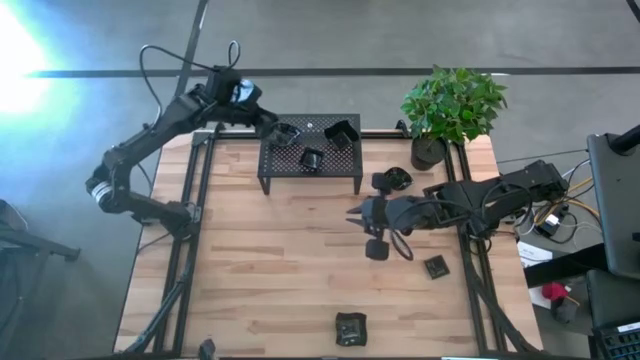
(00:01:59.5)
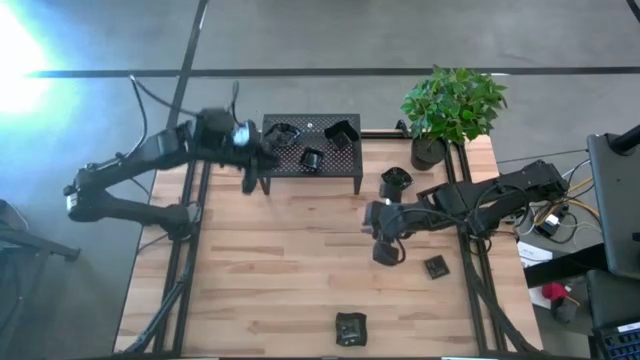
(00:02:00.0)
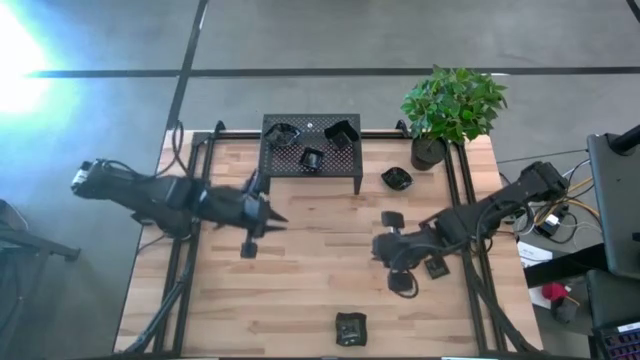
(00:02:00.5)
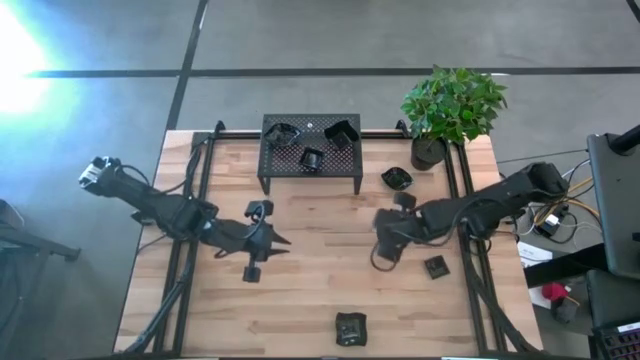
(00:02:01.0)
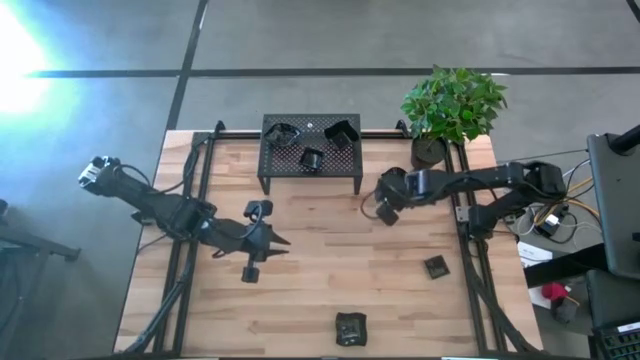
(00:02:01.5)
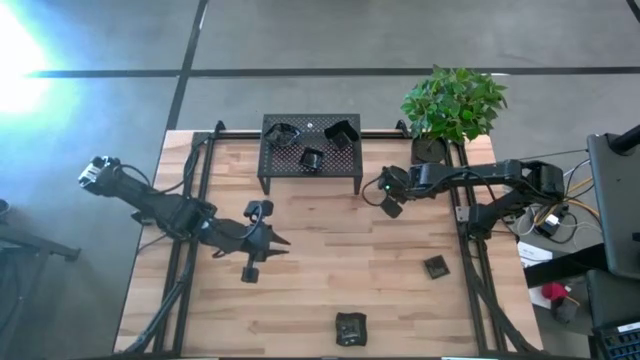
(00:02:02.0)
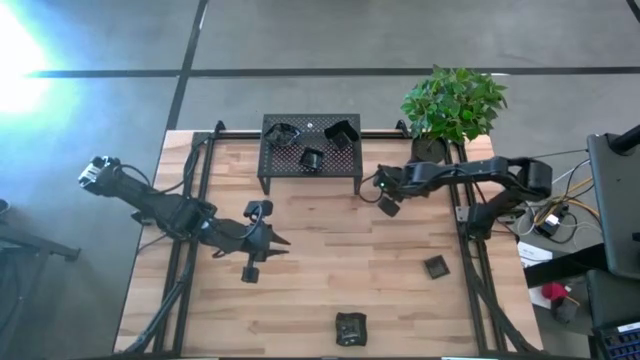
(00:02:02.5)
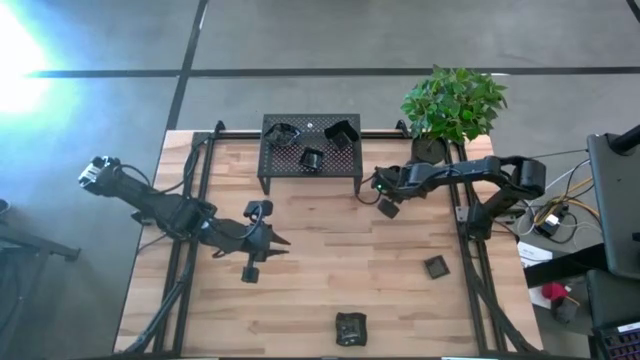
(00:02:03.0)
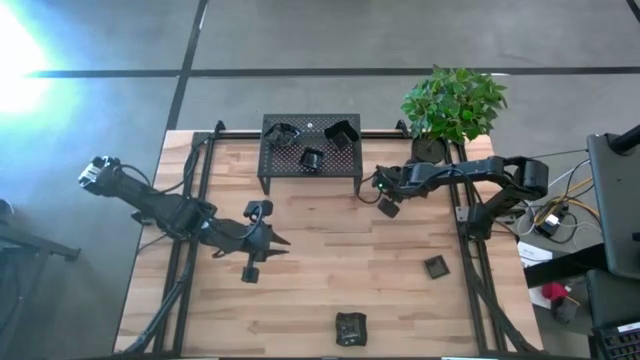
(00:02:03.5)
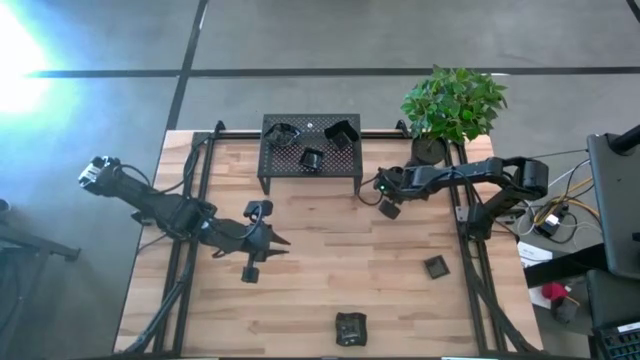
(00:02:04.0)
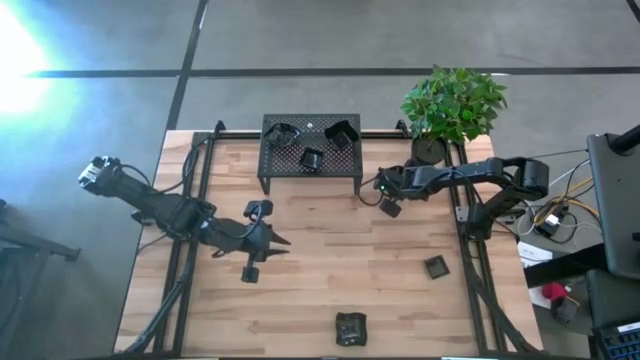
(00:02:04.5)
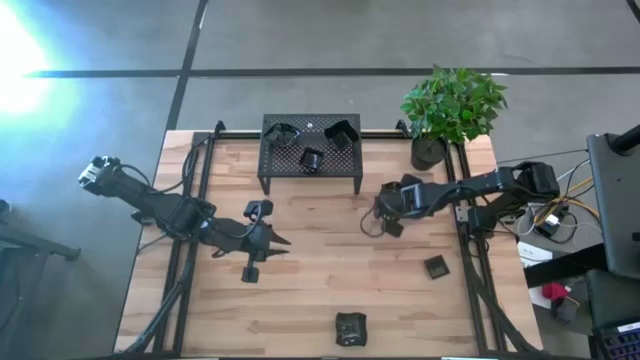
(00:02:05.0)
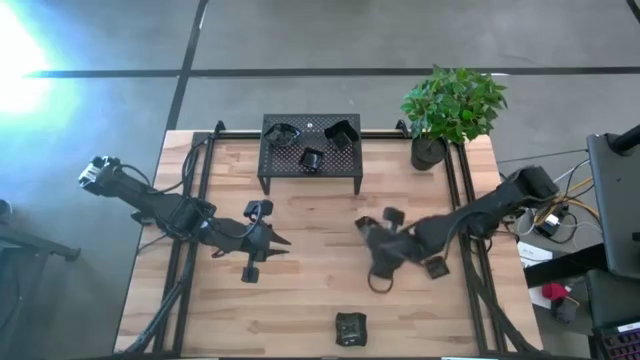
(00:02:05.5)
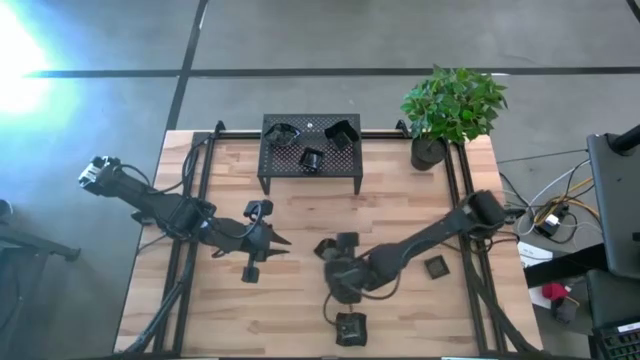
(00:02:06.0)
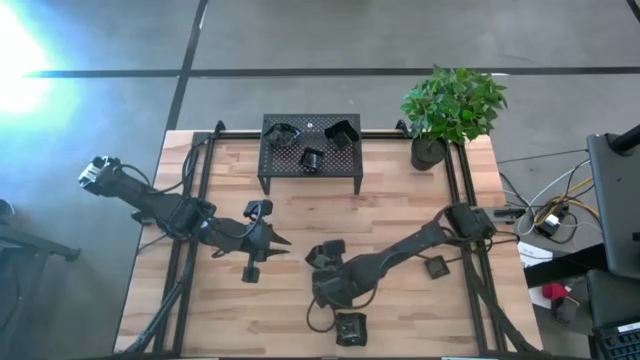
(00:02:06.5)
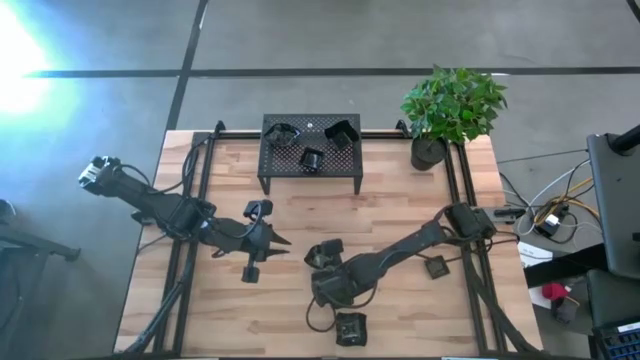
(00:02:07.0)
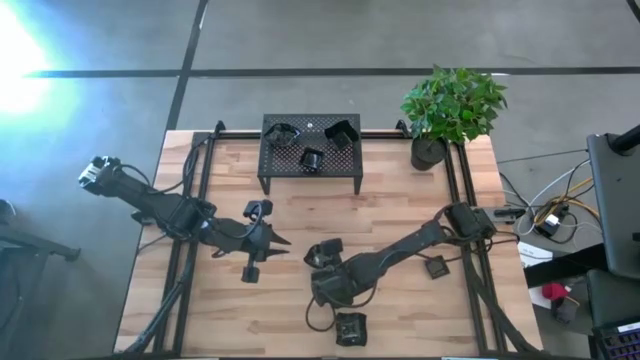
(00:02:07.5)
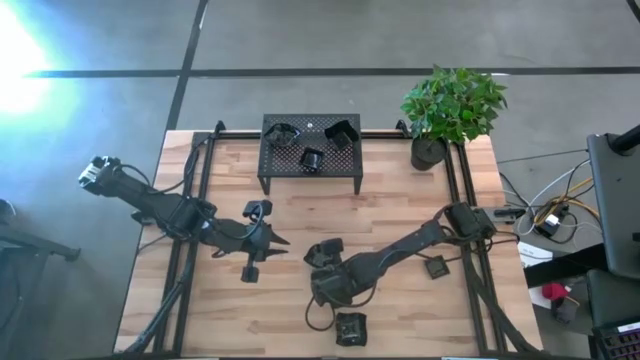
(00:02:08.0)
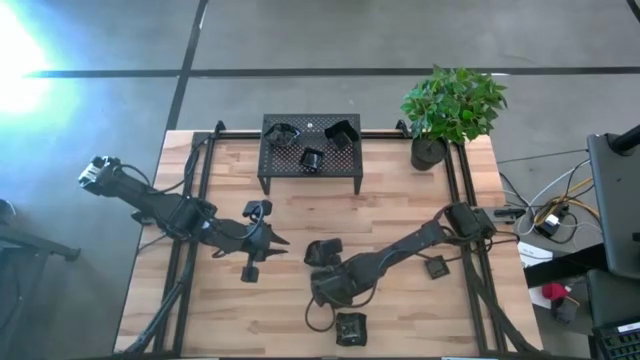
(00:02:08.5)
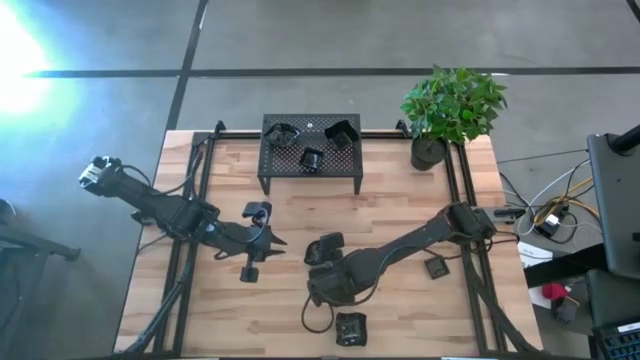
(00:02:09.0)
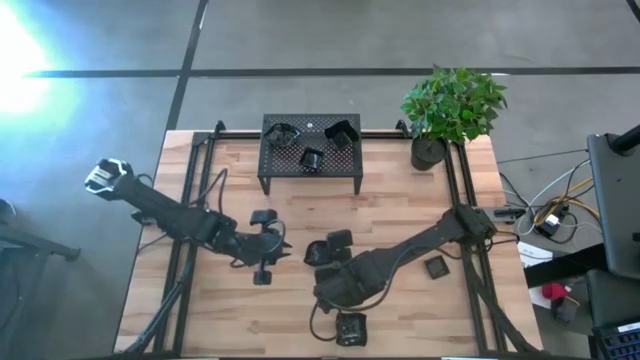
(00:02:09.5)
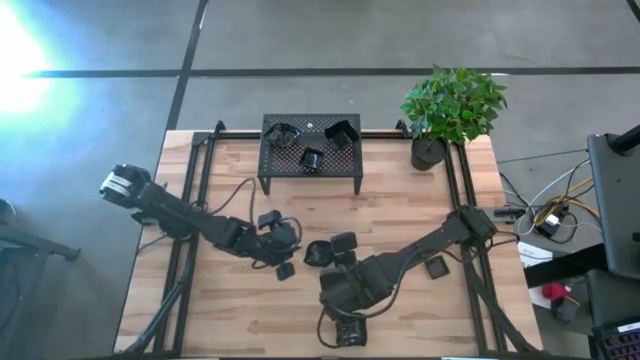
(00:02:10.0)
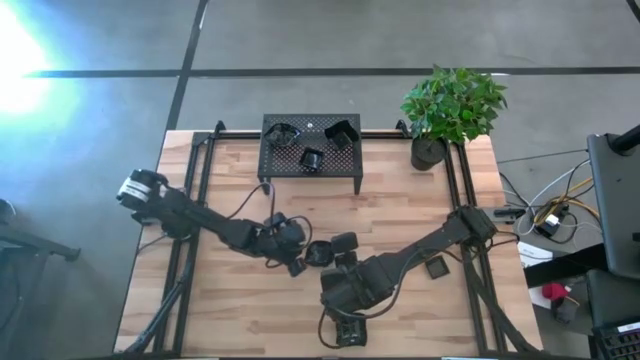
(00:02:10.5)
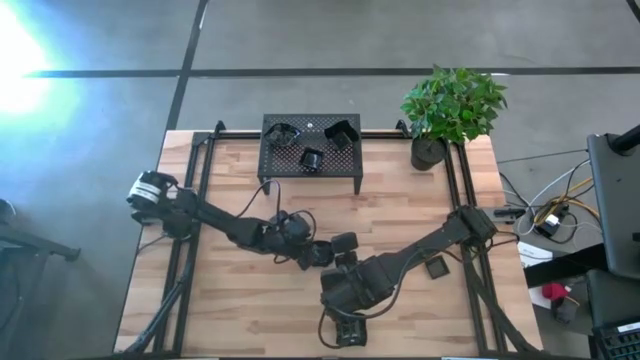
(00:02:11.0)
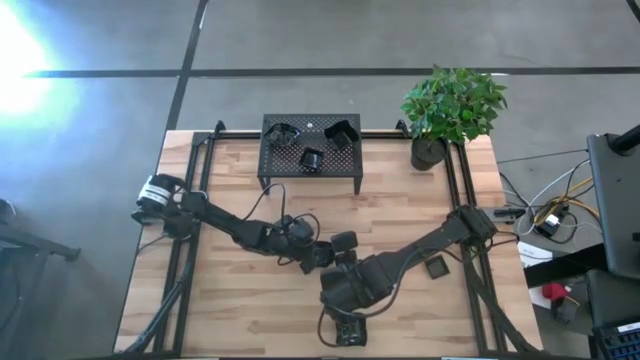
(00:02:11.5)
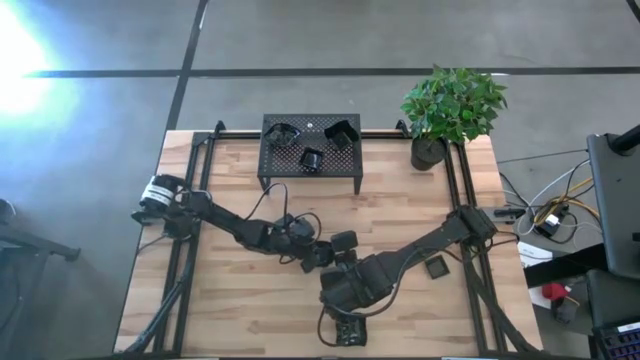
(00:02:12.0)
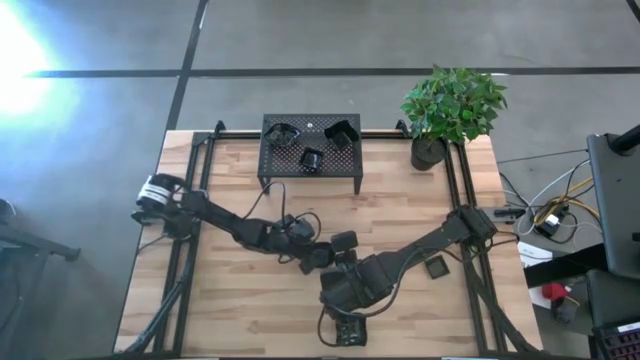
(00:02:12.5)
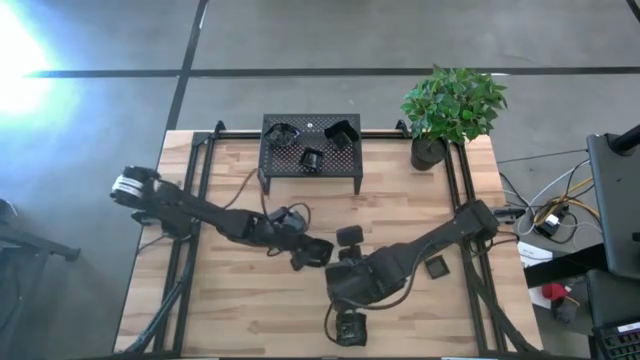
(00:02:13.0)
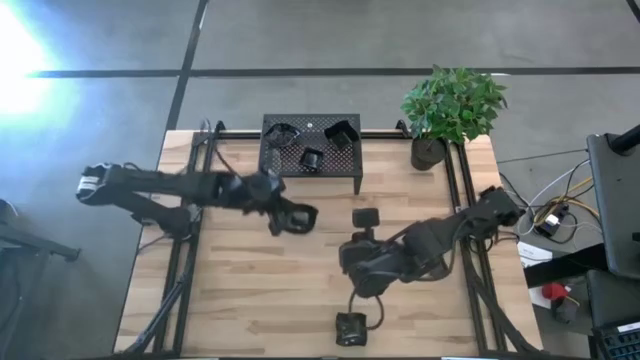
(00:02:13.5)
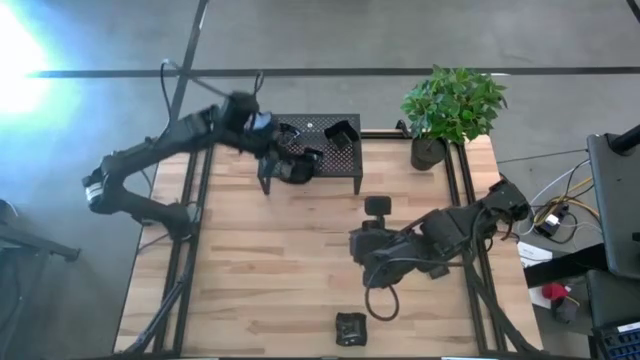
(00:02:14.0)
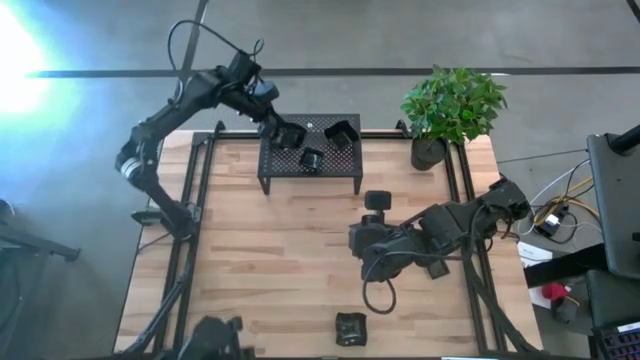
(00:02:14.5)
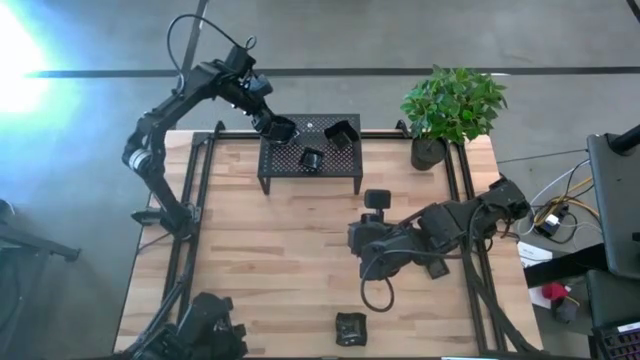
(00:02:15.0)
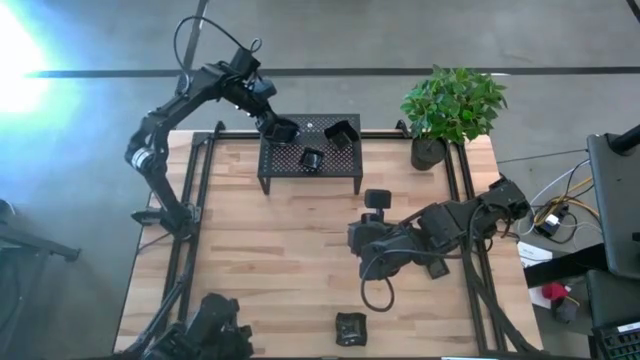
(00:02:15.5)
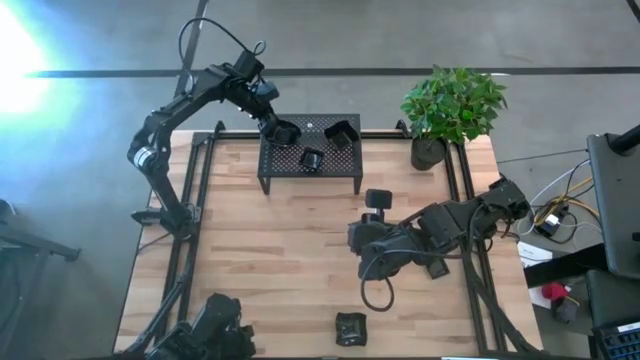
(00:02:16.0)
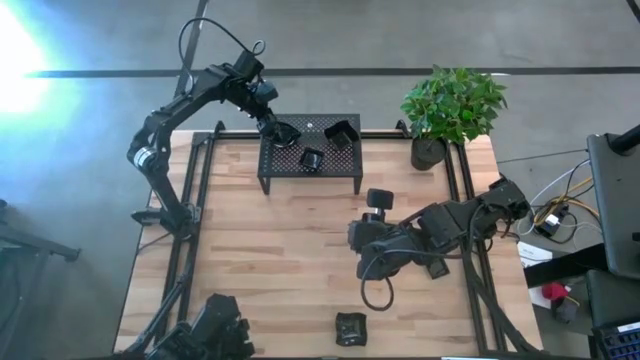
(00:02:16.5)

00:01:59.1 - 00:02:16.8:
Task: Pick & Place Mini shaped plates
Stack the leaf shaped plate on top of the leaf shaped plates on the shelf

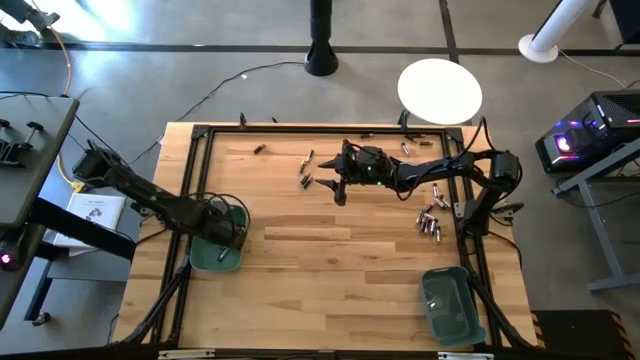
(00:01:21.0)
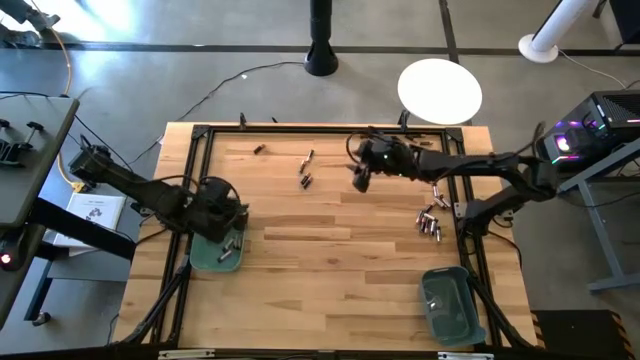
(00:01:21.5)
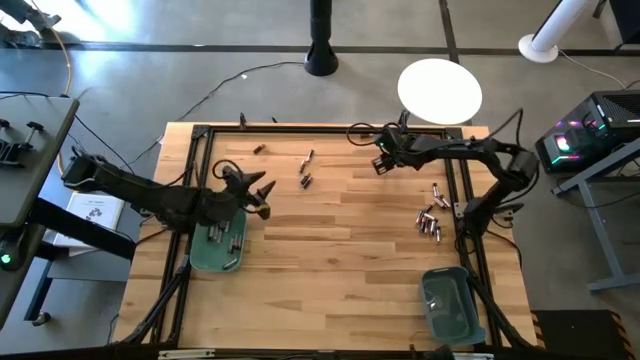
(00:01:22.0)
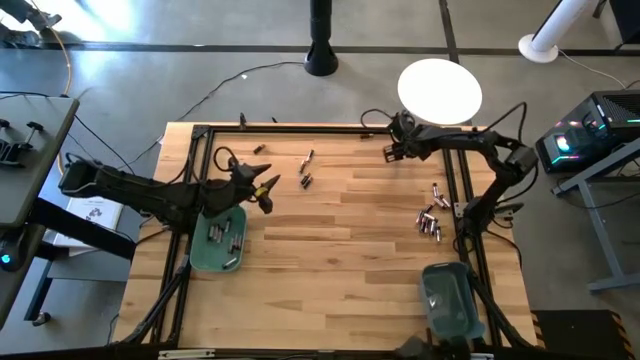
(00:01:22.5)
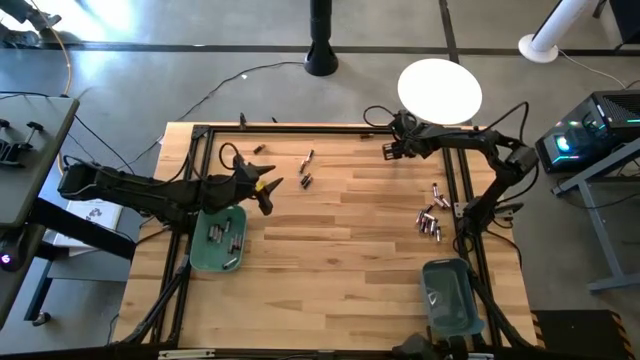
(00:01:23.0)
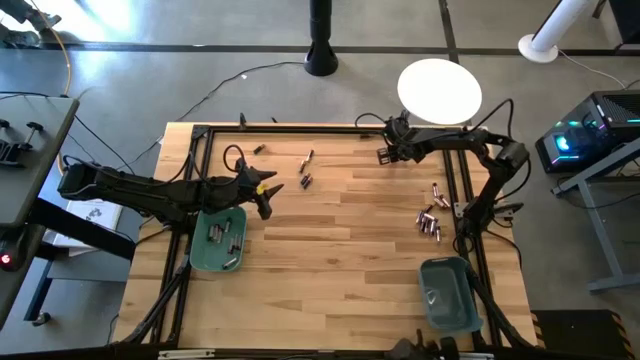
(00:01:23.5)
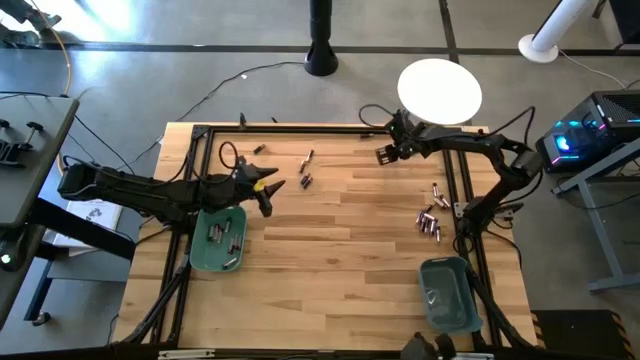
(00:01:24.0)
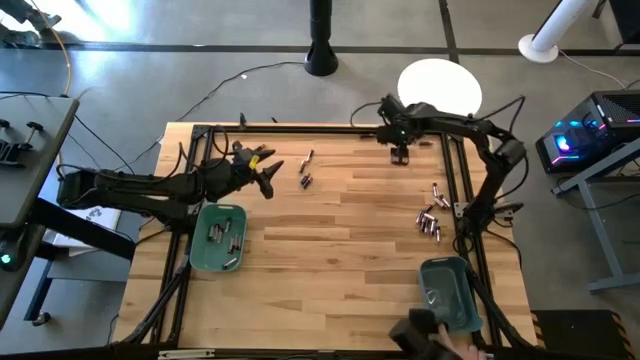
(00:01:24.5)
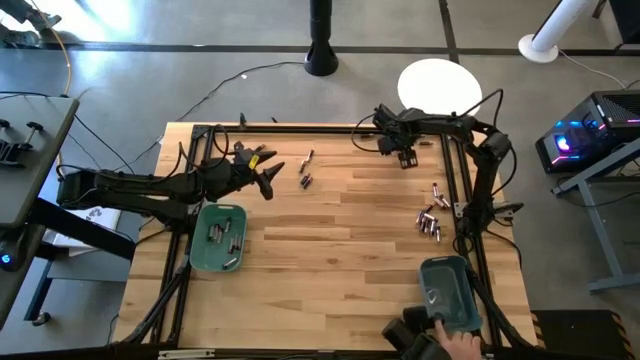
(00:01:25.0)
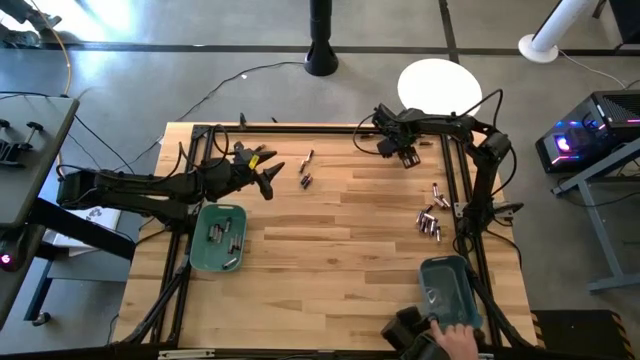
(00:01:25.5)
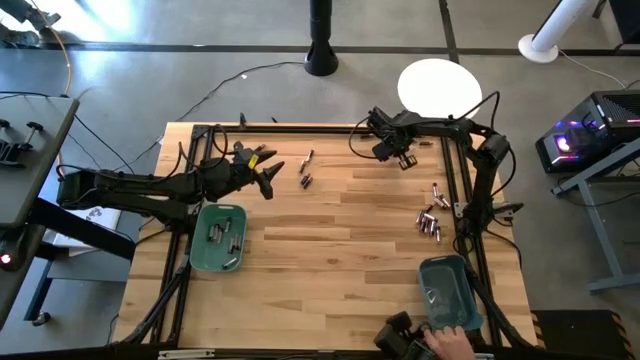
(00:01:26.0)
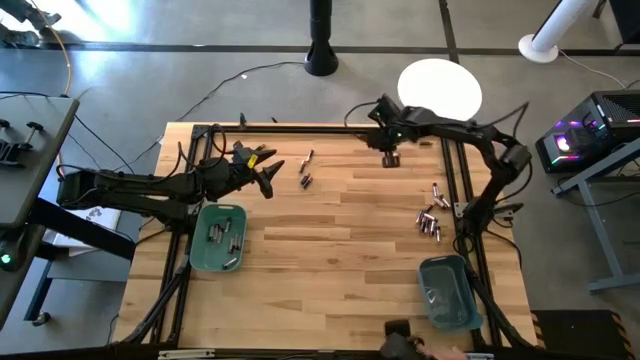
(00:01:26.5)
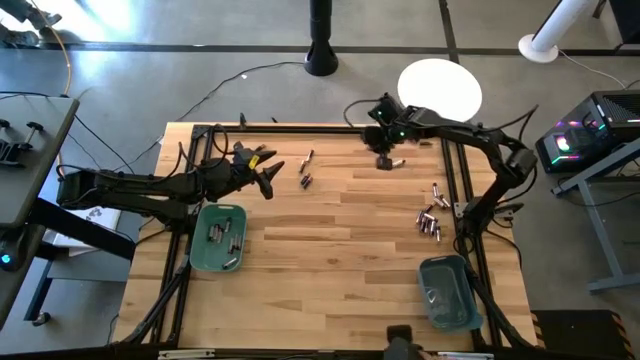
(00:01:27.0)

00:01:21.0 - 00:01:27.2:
Task: Sort batteries
Put the silver battery into the green bin
